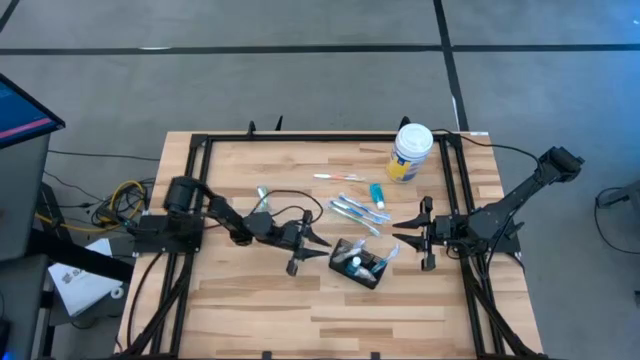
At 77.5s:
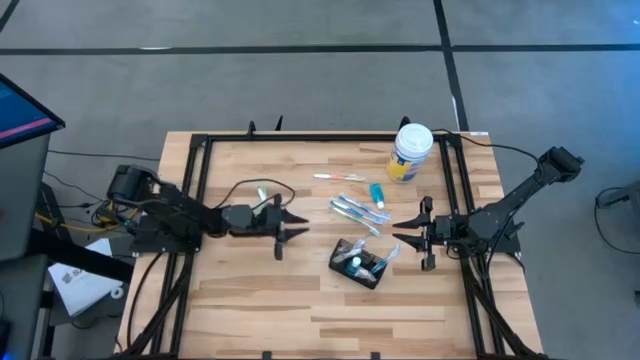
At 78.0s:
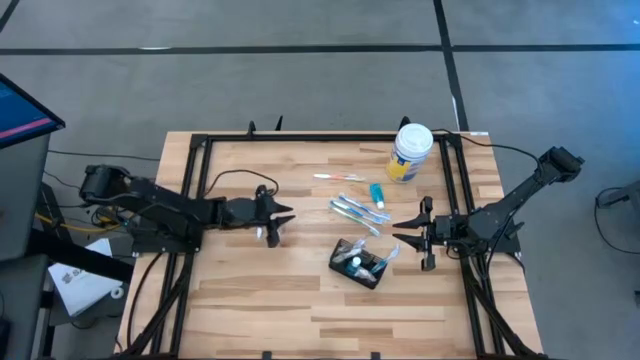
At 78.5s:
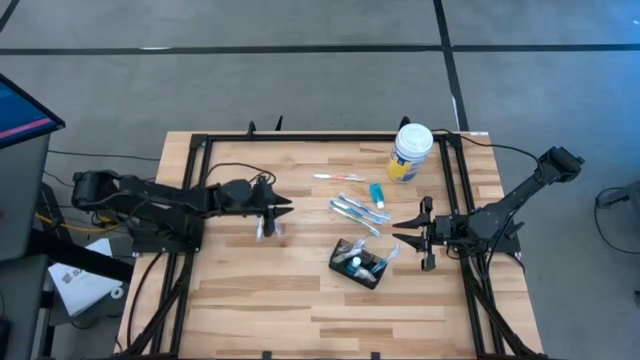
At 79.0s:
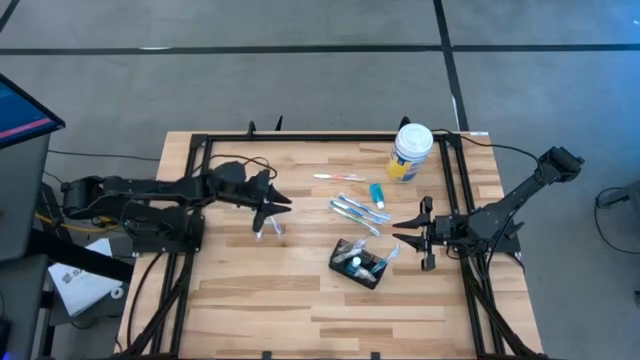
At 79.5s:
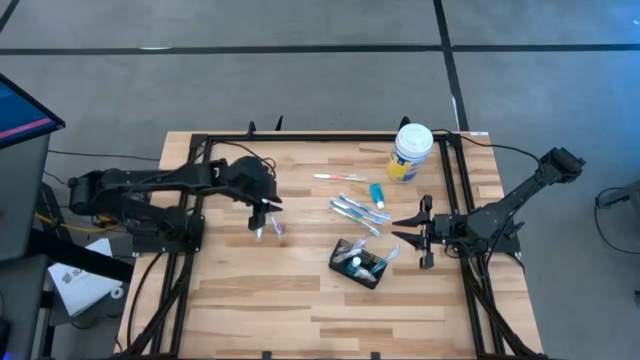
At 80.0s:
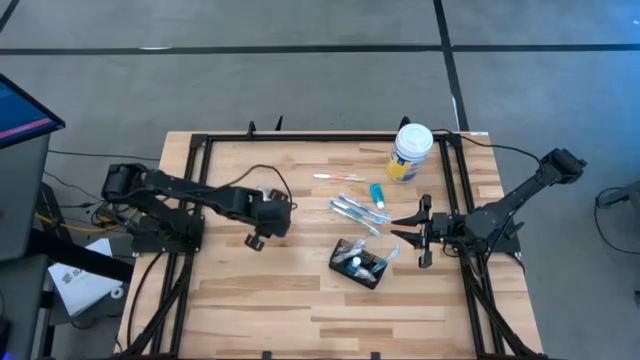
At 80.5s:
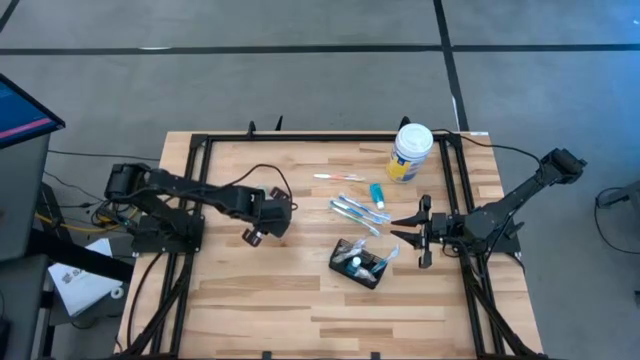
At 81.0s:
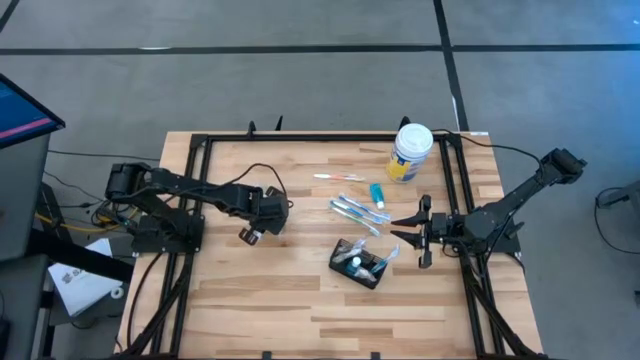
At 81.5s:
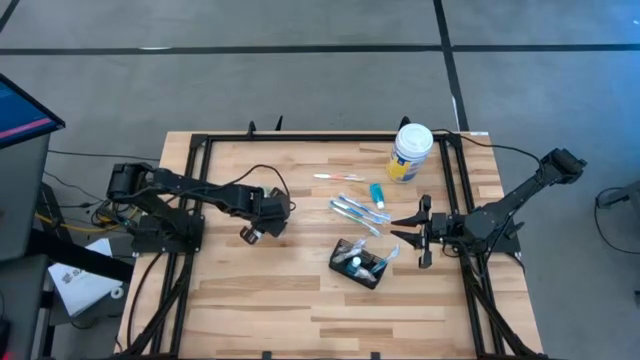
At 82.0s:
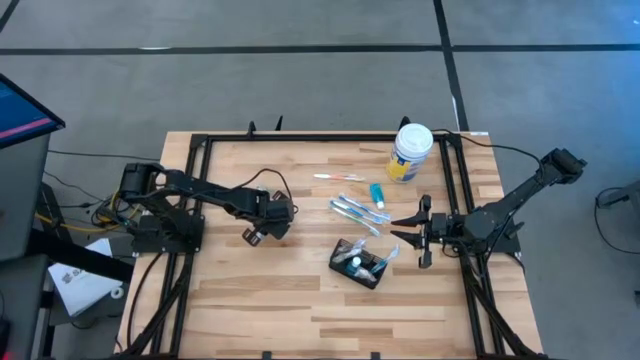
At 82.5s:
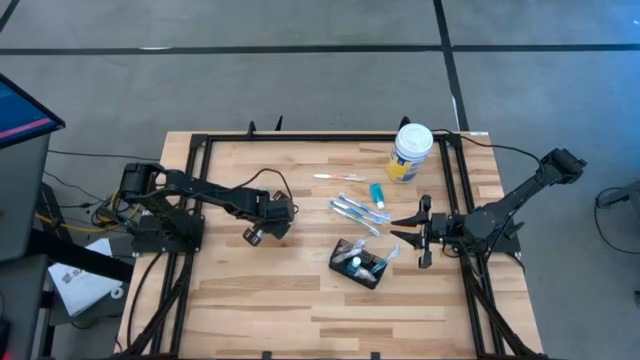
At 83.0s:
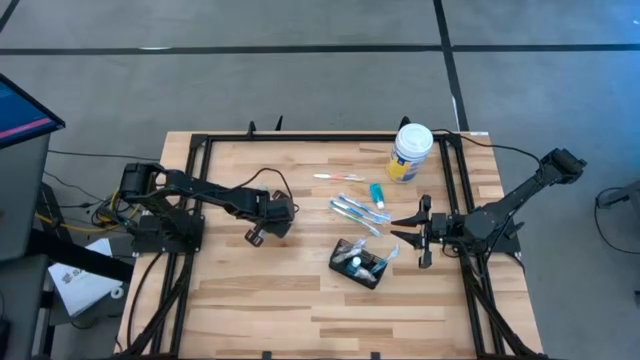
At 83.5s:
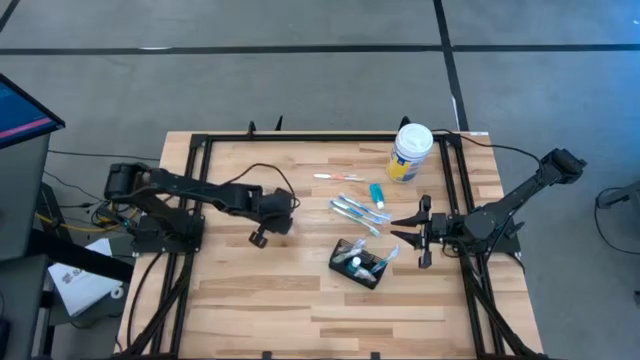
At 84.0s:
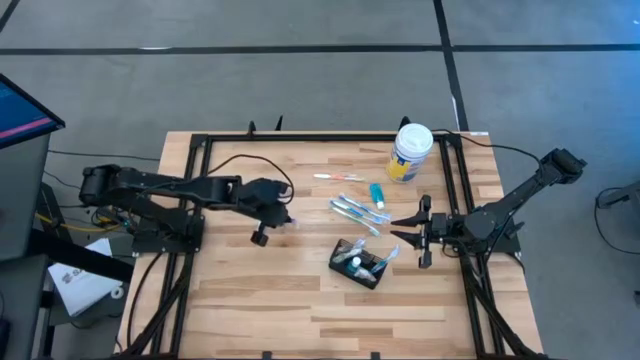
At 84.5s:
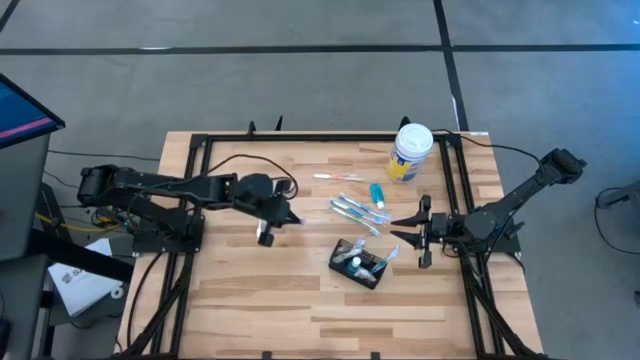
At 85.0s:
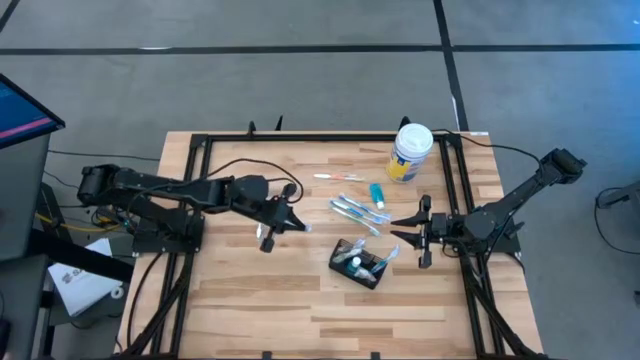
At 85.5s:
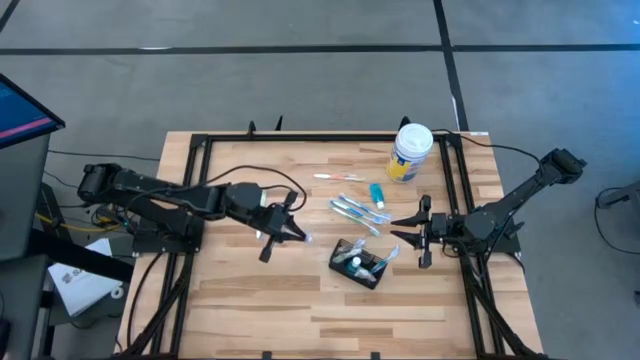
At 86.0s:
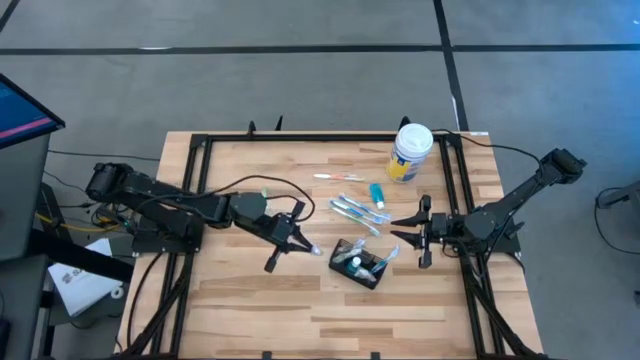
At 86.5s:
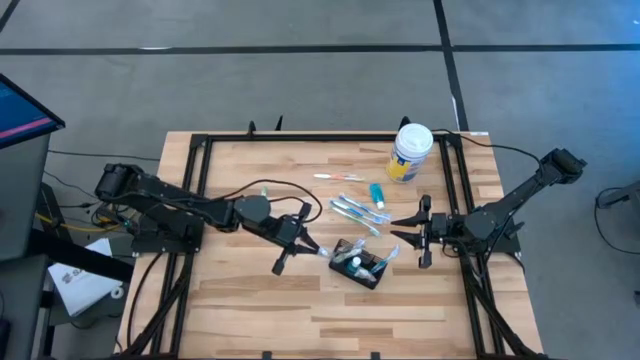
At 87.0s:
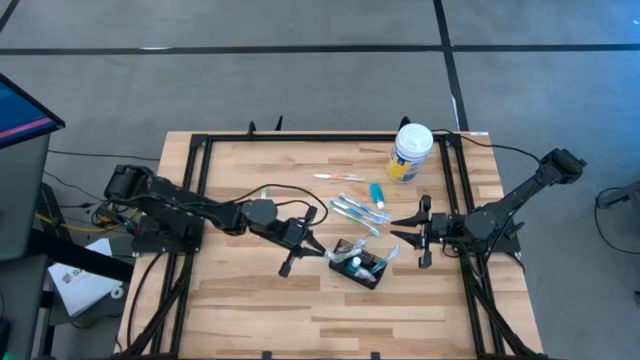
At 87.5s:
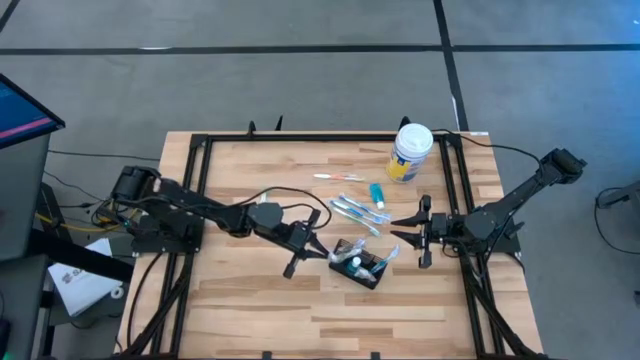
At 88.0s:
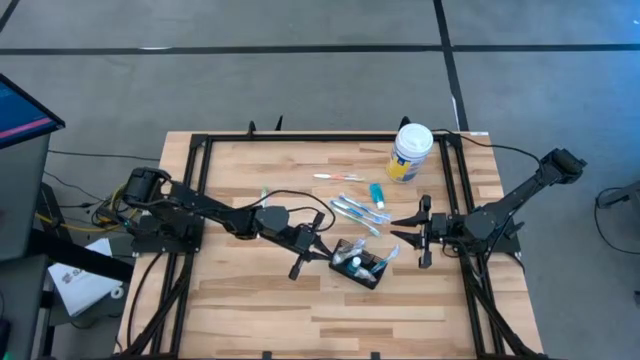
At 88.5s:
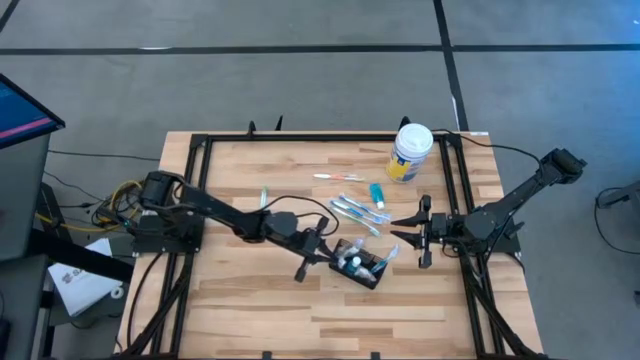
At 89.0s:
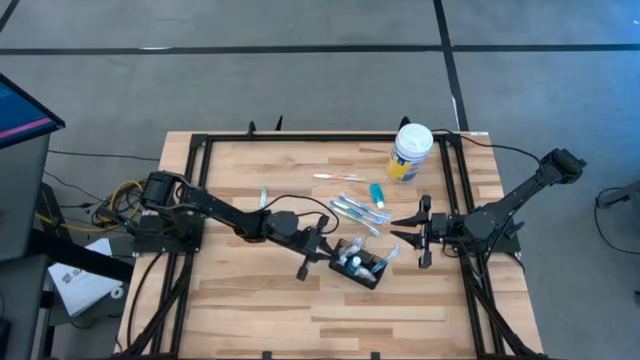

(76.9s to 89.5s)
Task: Pick & Place toothbrushing station
Put the violet toothbrush into the mesh organizer

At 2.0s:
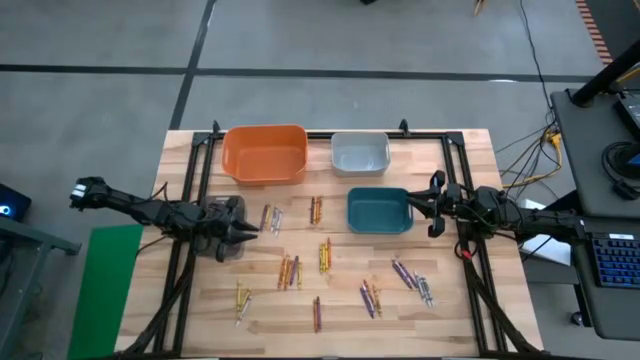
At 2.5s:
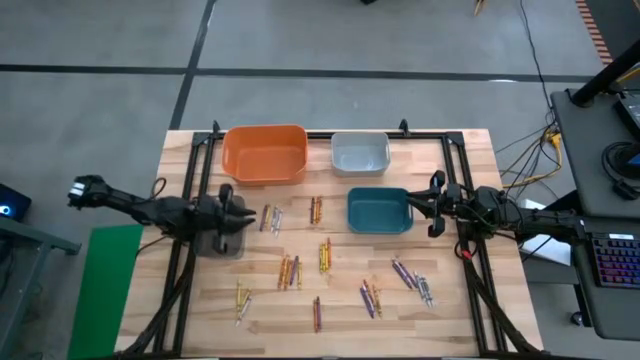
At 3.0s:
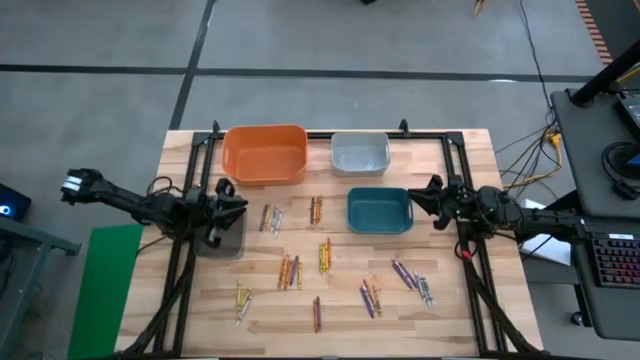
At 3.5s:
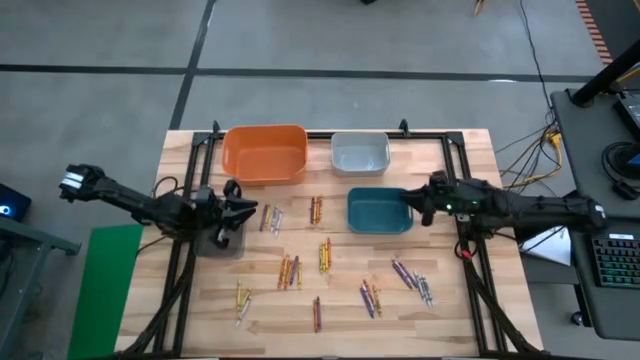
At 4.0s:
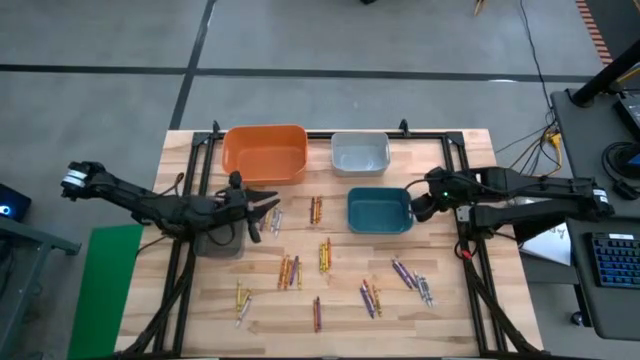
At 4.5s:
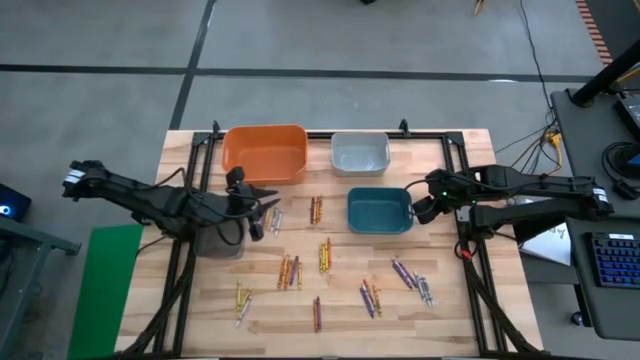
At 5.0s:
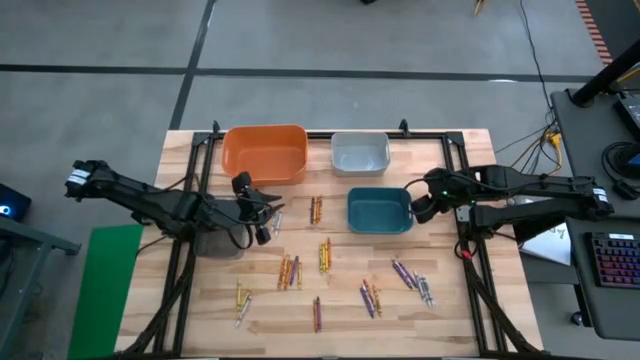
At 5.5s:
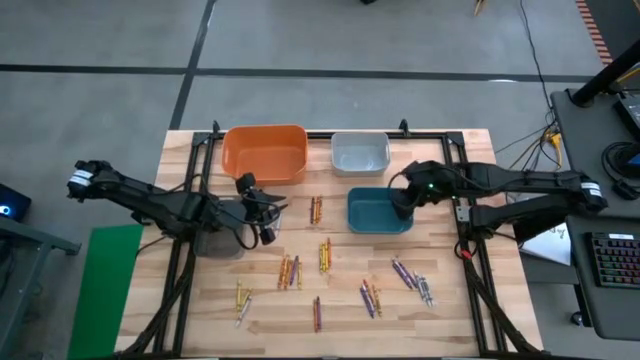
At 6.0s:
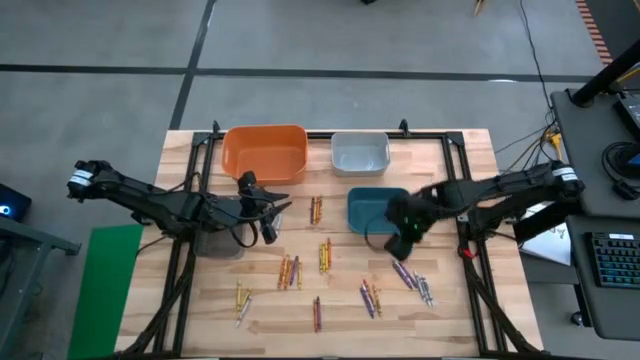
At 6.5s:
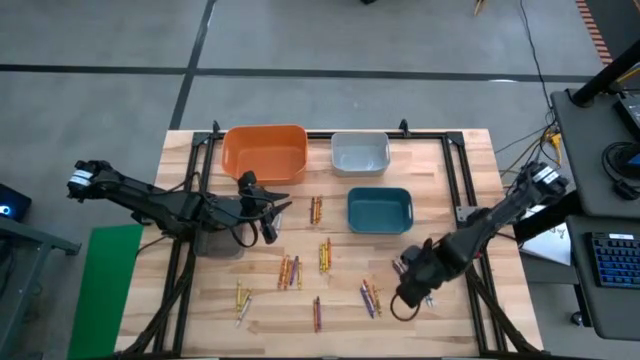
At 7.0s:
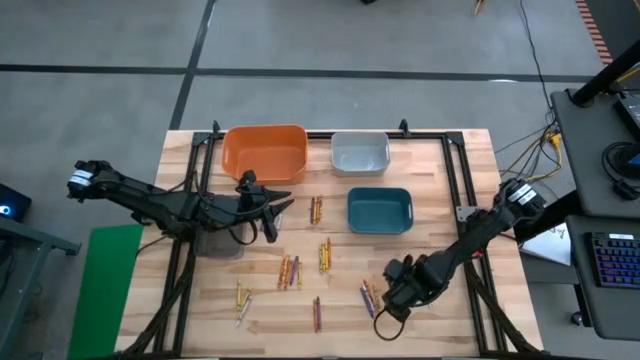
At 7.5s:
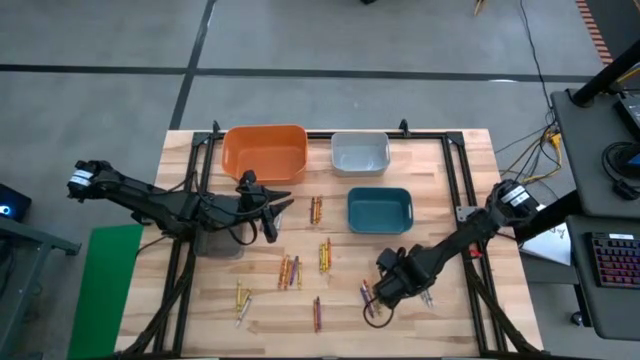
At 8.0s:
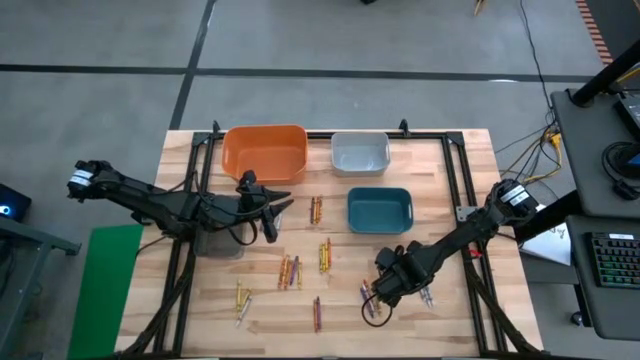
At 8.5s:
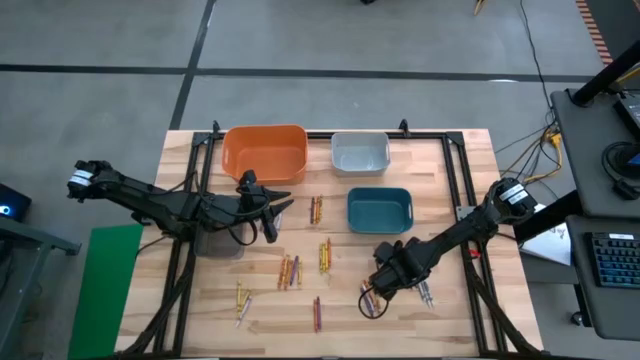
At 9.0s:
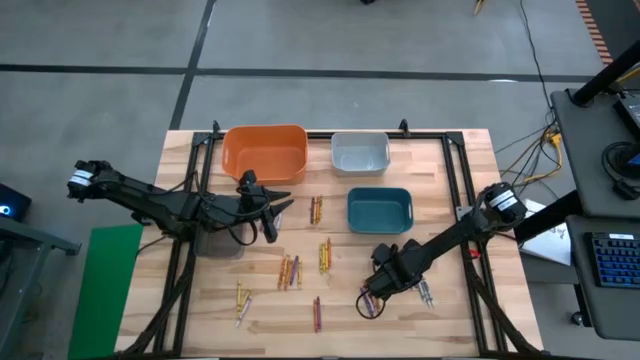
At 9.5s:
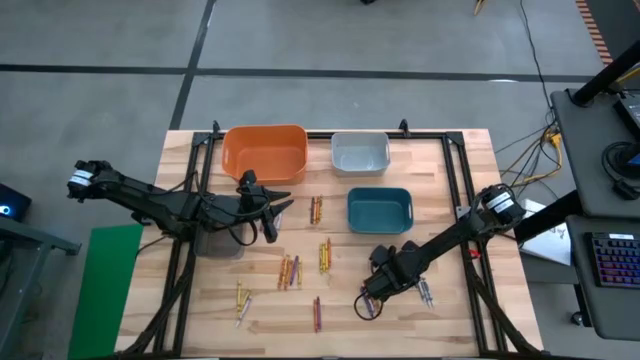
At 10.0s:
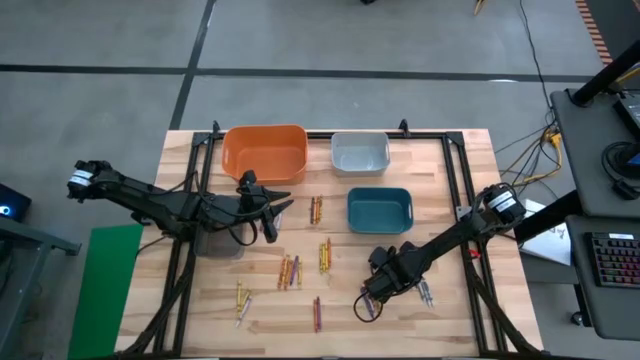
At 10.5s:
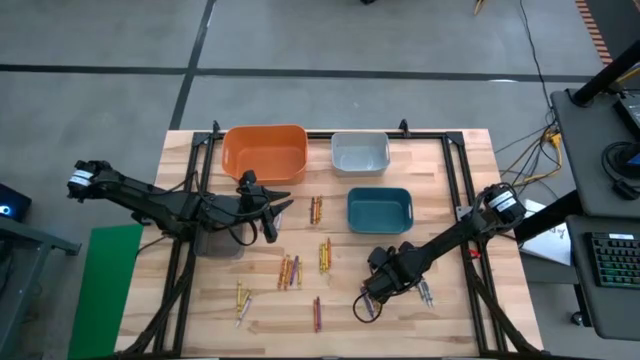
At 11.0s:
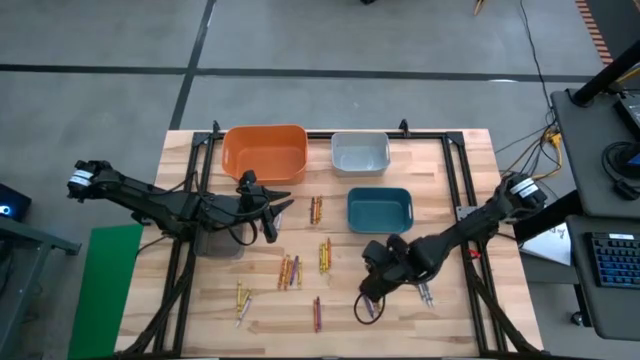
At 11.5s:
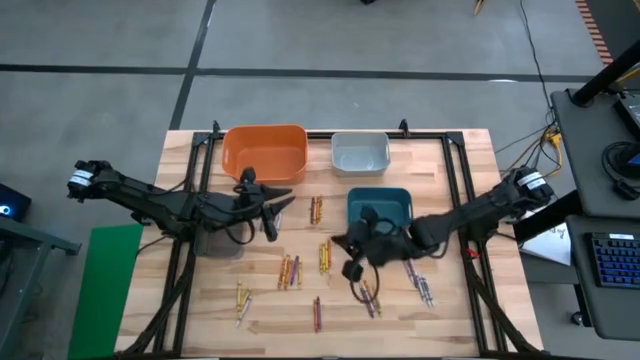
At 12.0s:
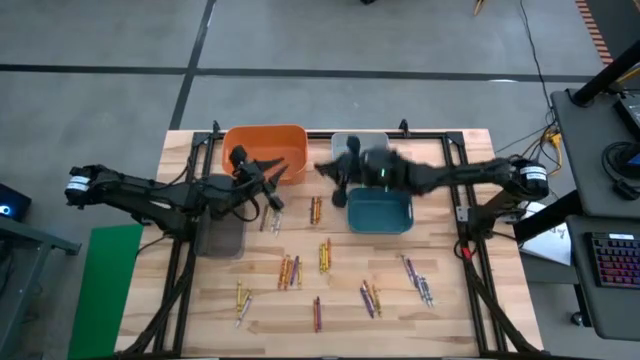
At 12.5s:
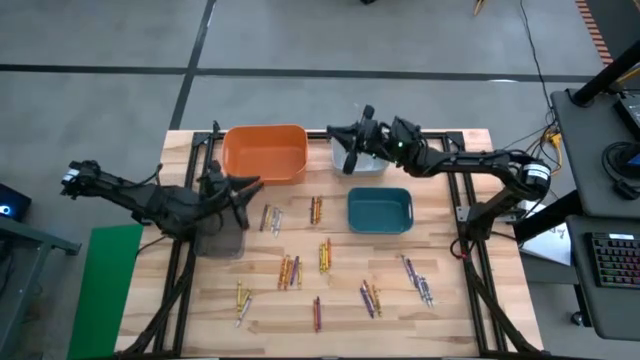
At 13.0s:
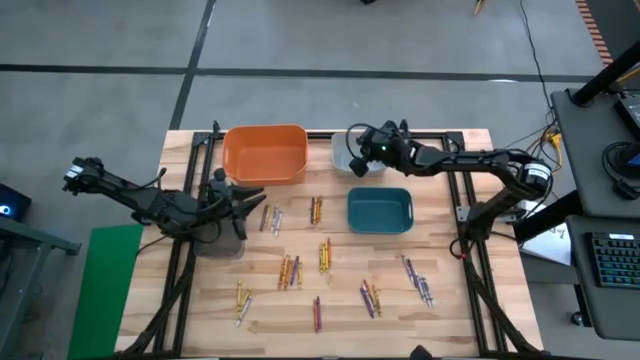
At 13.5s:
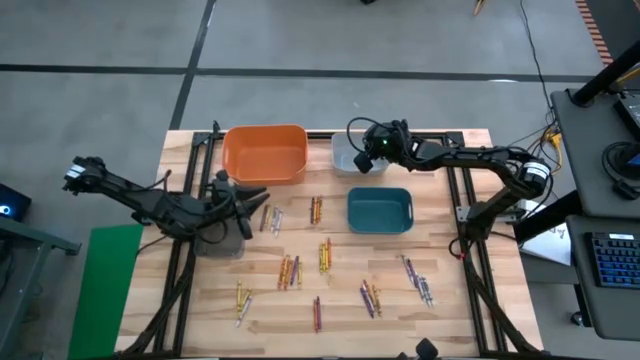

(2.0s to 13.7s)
Task: Sort crayons
Put the violet crayon into the gray bin
